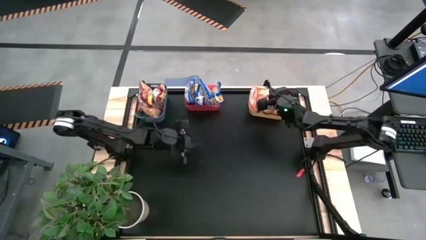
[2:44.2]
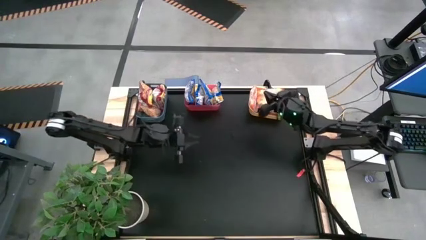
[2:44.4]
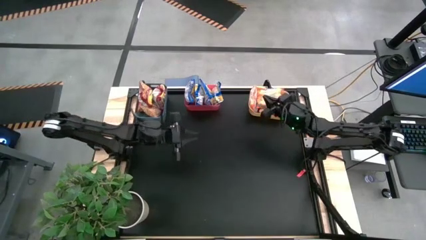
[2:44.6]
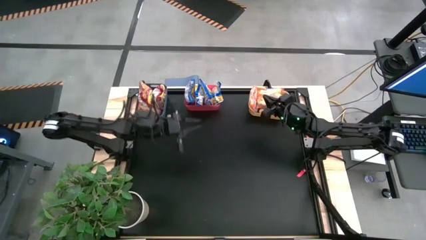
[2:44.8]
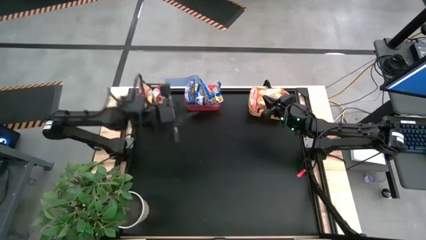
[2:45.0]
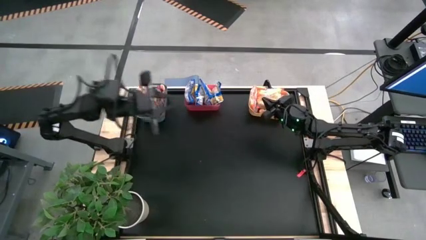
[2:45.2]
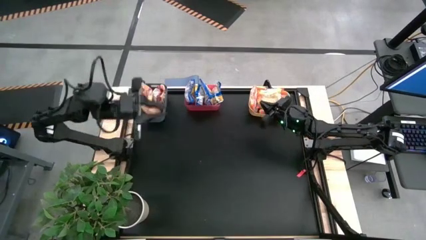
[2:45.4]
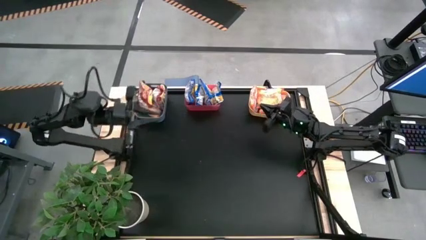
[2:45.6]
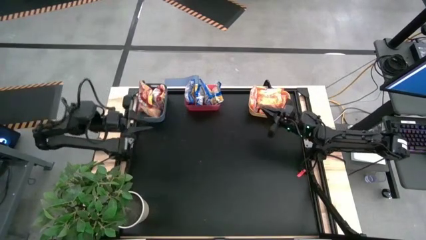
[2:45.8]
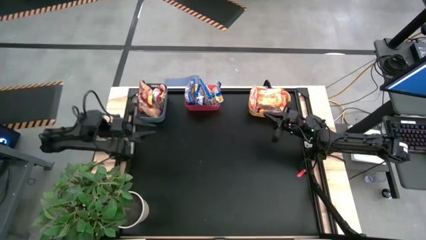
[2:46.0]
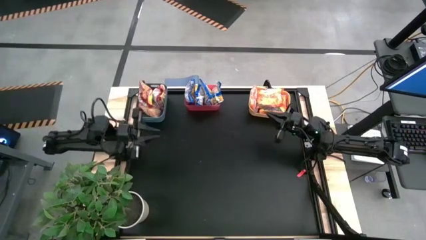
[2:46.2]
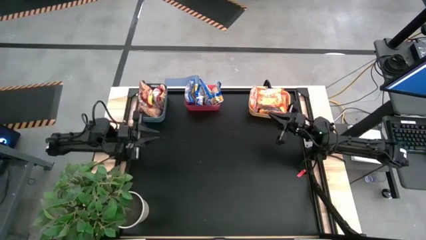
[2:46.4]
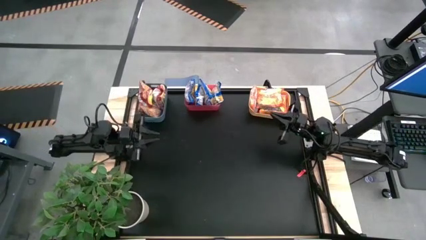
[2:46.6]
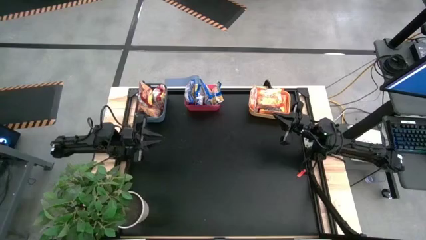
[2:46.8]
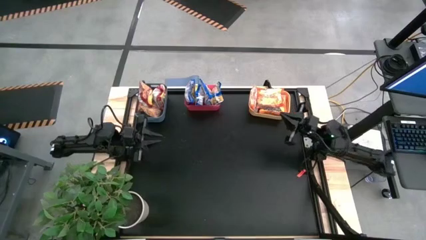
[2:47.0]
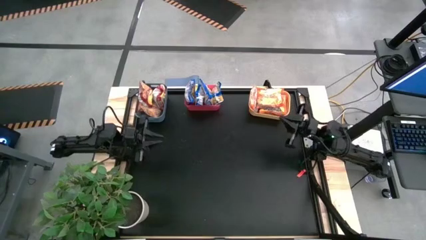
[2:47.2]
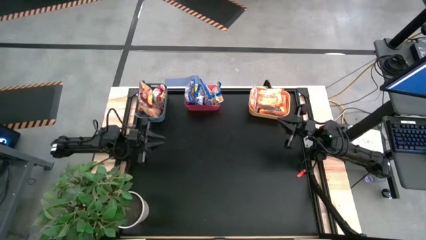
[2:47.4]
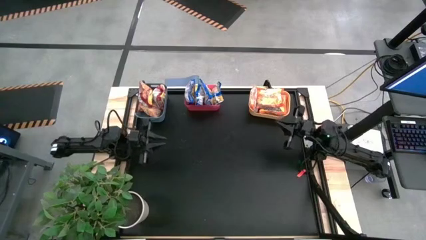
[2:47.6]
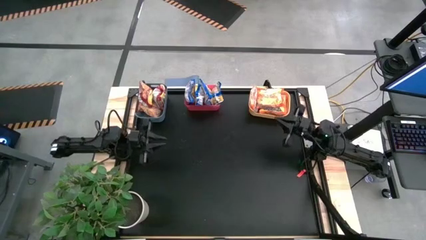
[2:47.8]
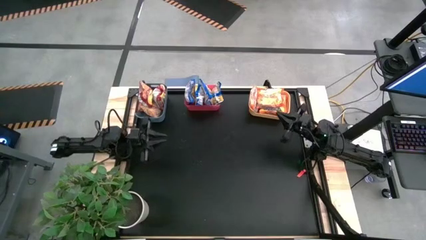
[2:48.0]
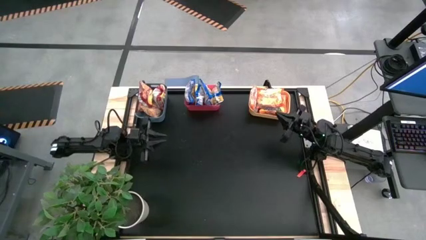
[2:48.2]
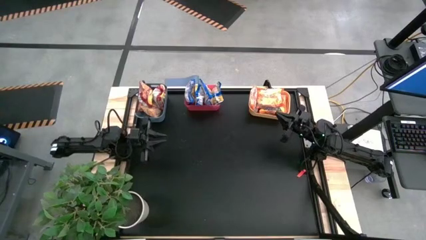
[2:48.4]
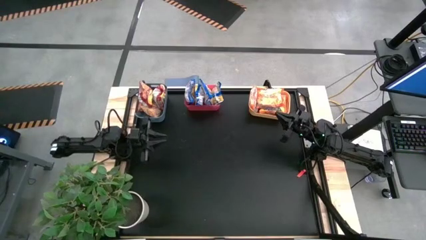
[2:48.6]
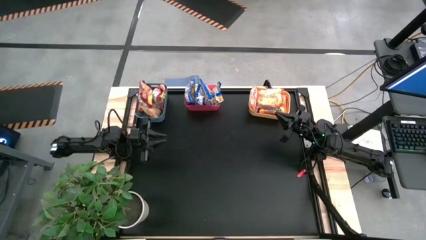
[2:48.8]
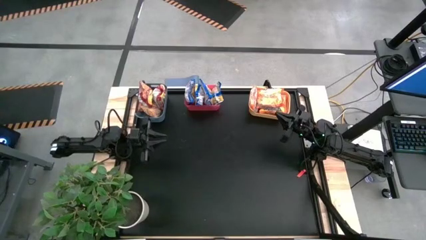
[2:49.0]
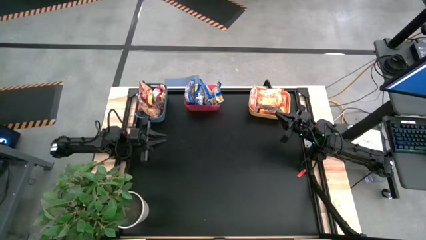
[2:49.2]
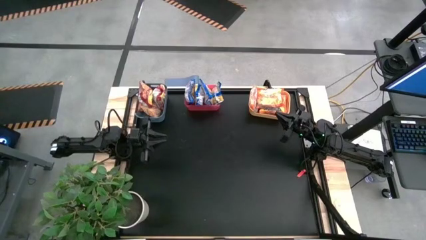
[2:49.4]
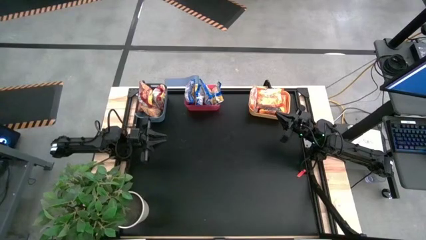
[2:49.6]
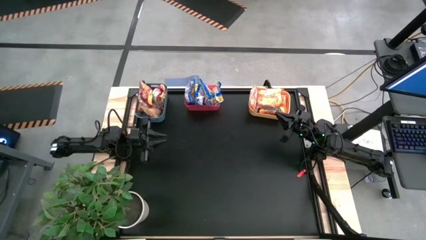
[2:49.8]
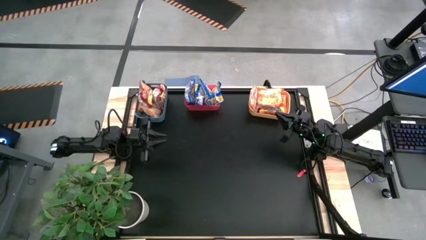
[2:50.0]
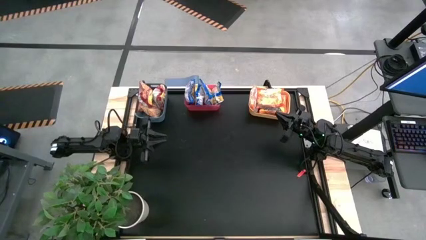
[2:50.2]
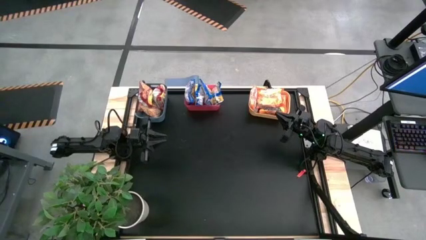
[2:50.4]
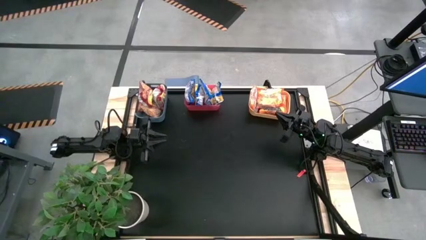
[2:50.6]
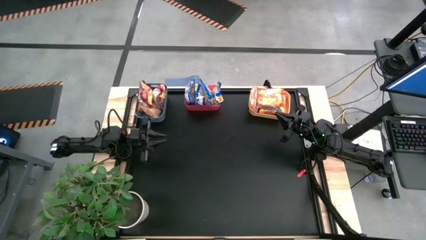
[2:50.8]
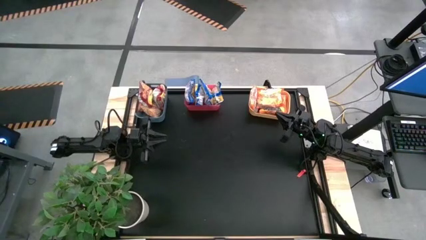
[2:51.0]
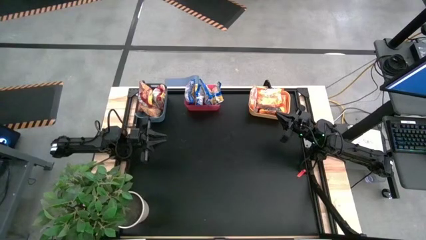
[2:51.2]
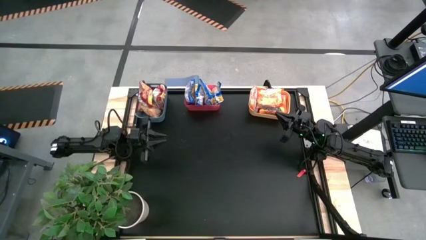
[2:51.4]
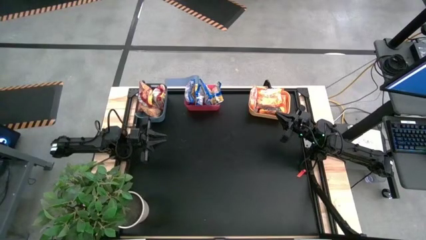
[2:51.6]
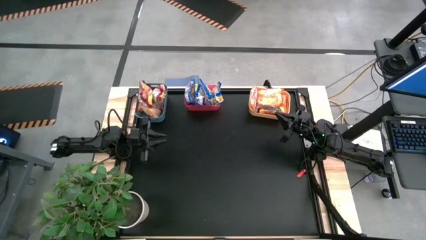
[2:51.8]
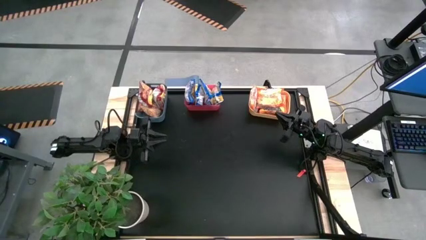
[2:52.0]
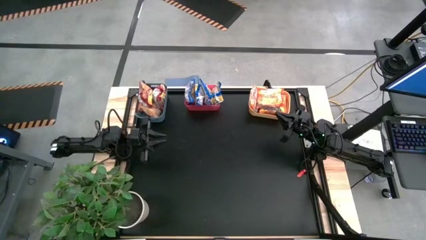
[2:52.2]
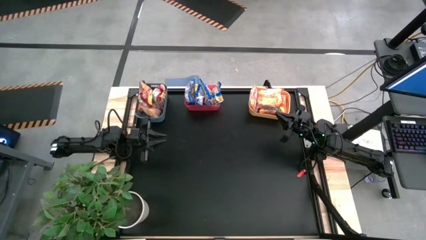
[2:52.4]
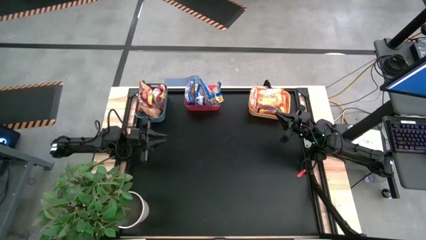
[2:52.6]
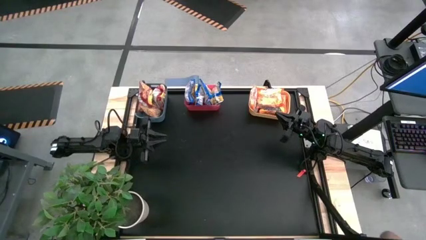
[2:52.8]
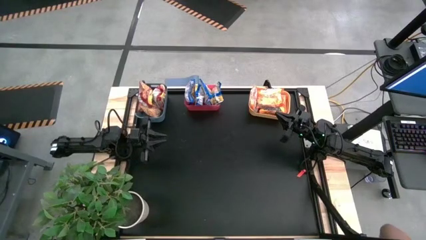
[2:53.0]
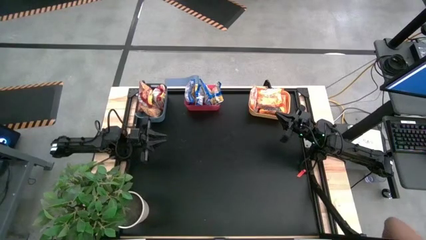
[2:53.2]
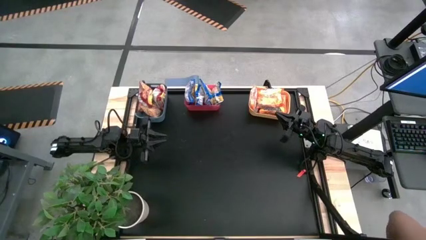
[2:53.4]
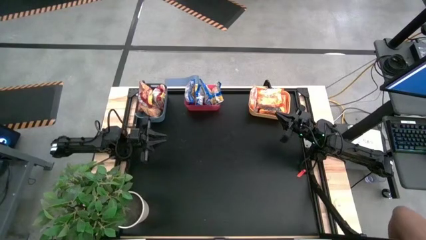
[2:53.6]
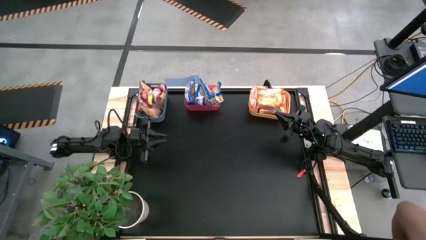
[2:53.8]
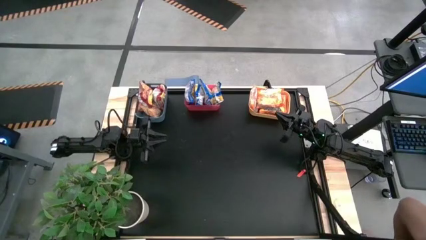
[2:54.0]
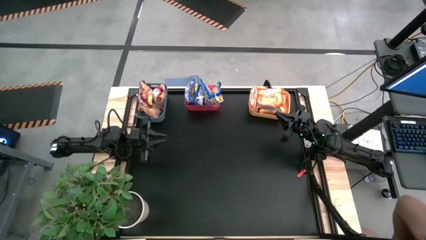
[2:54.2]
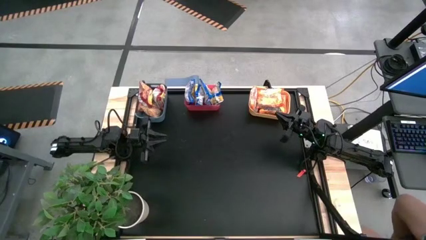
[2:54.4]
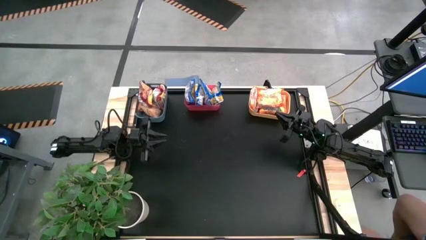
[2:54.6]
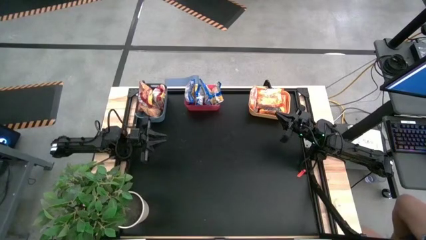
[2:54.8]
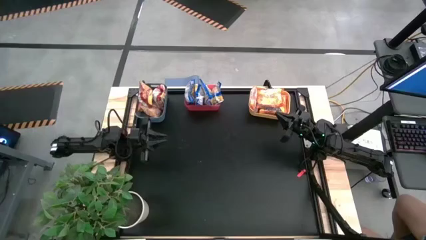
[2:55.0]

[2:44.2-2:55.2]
Task: Sort Maruchan noodles
Return to Home Position

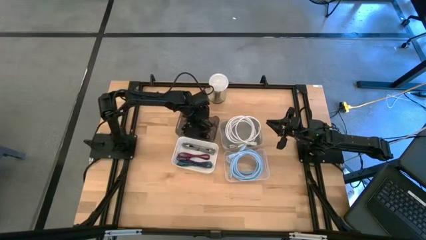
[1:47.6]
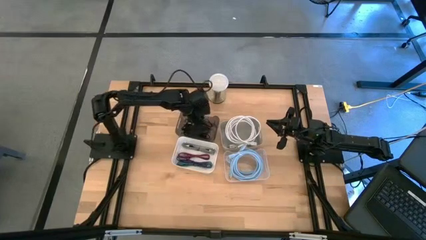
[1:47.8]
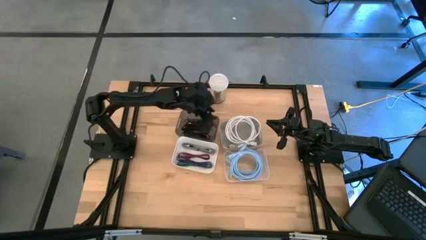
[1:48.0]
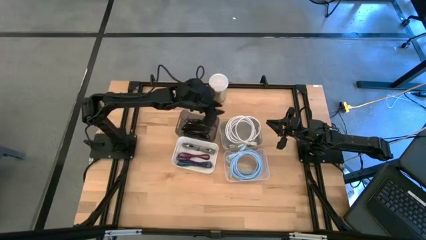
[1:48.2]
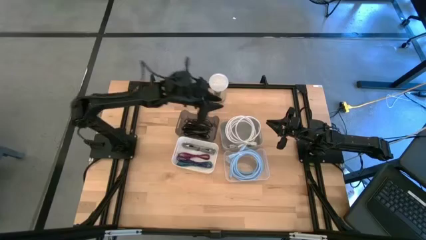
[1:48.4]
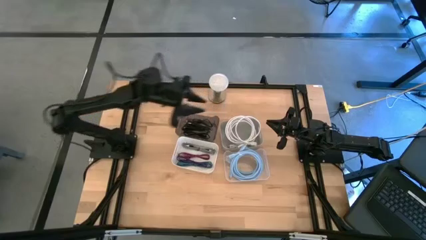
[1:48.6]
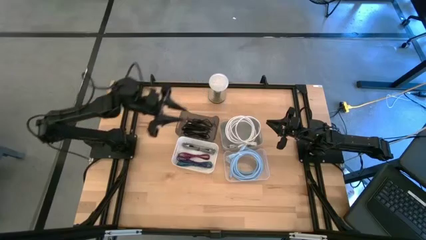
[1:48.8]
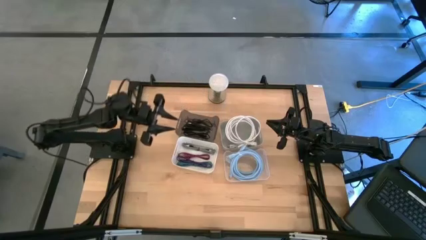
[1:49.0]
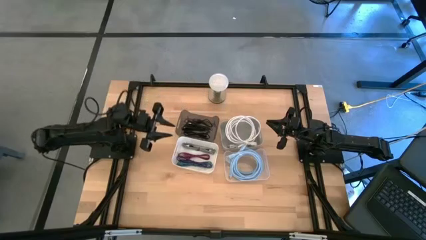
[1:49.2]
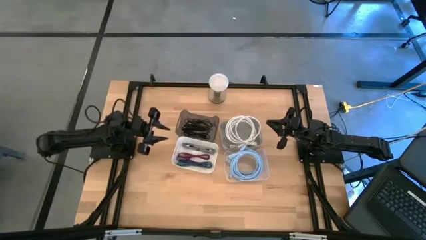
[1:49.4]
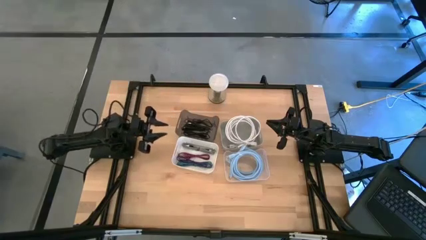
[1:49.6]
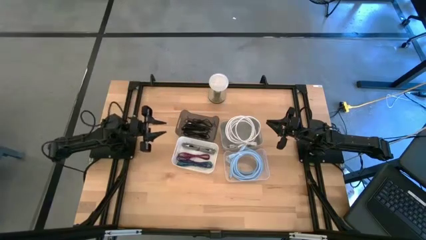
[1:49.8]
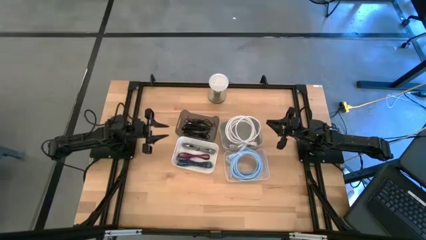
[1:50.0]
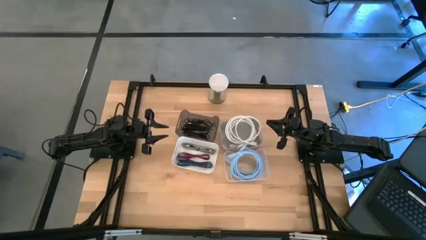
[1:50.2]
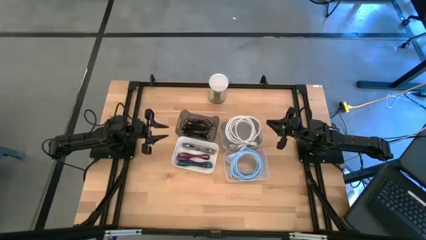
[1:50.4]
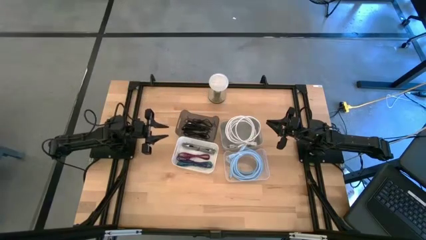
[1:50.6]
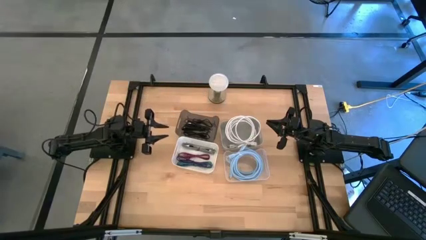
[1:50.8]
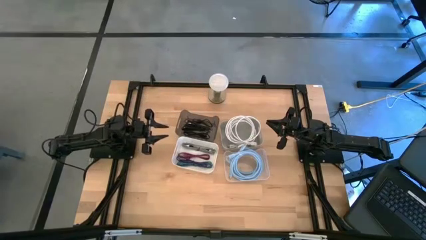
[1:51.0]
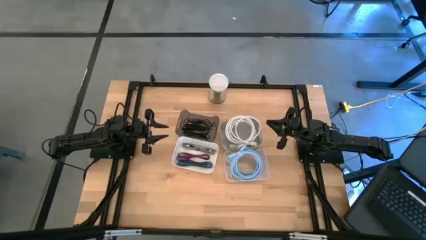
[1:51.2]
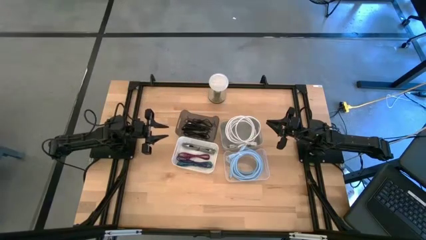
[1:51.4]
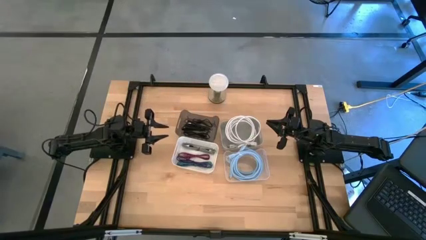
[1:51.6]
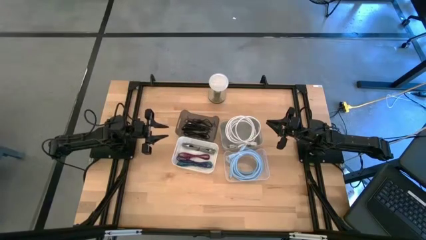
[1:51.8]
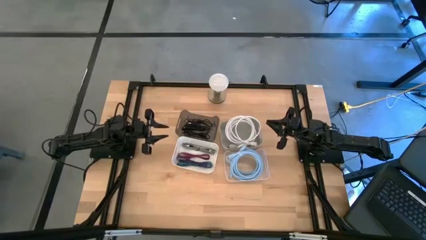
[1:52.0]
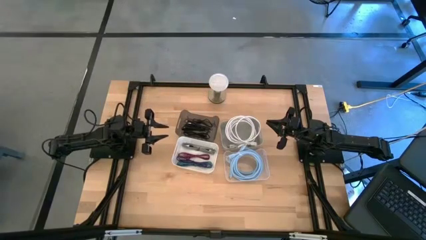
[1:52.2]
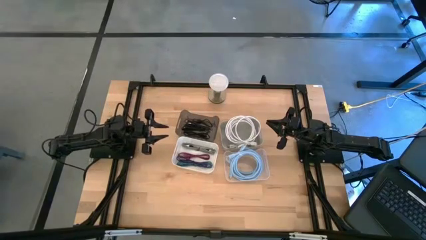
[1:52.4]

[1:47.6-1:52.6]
Task: Pick & Place USB Port
Return to Home Position
